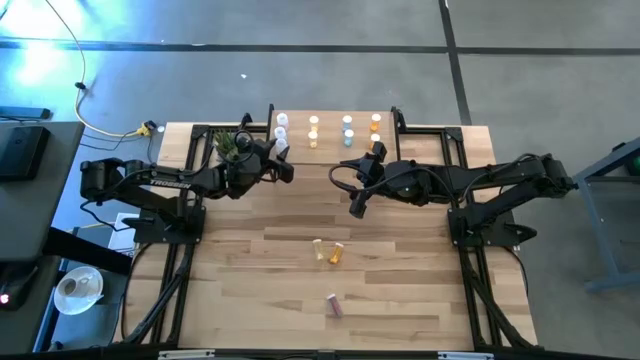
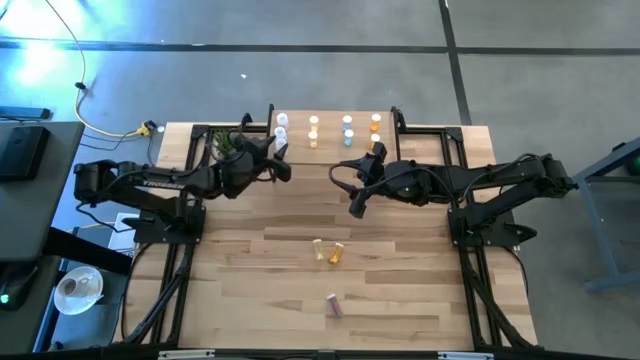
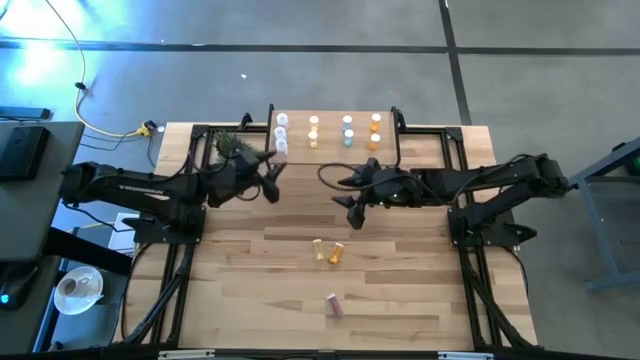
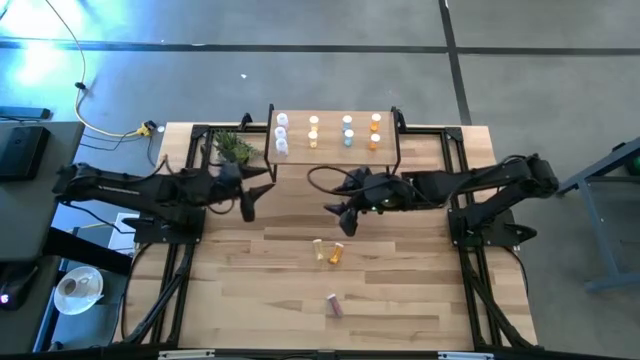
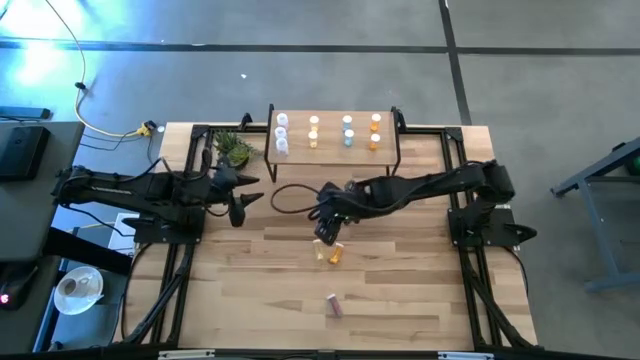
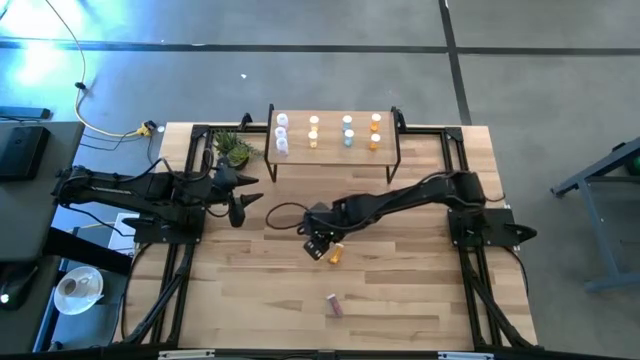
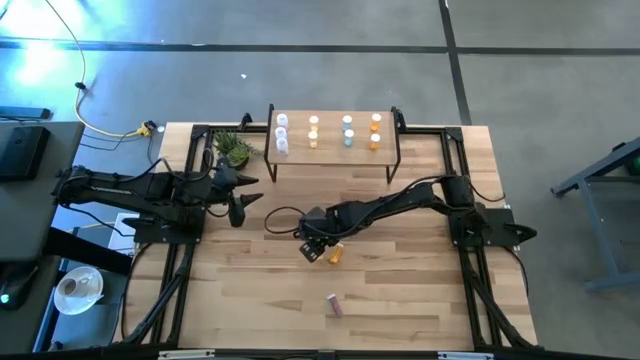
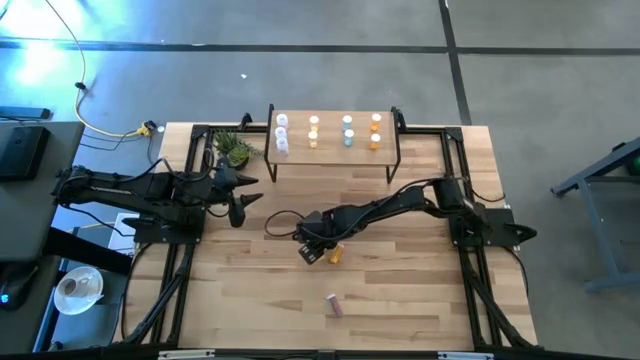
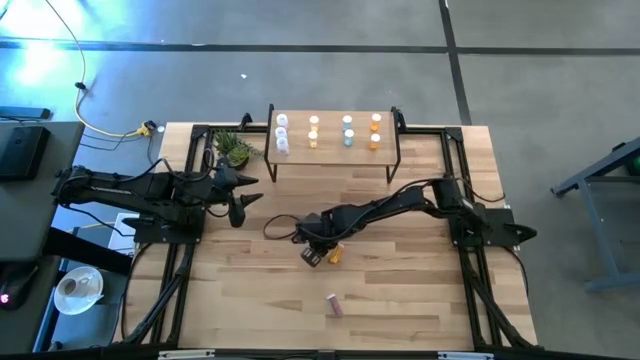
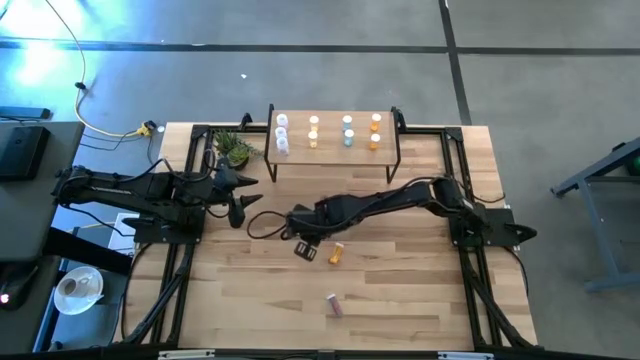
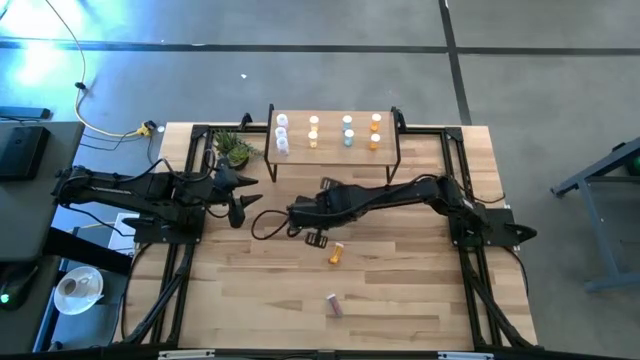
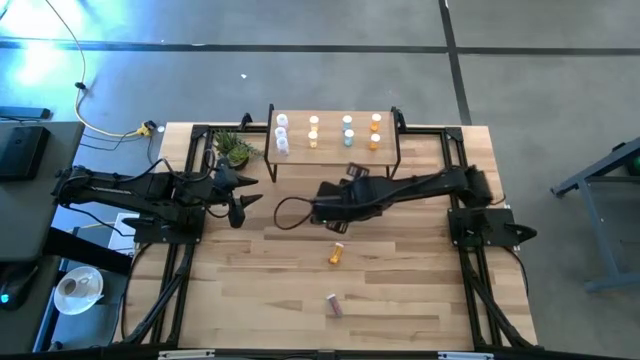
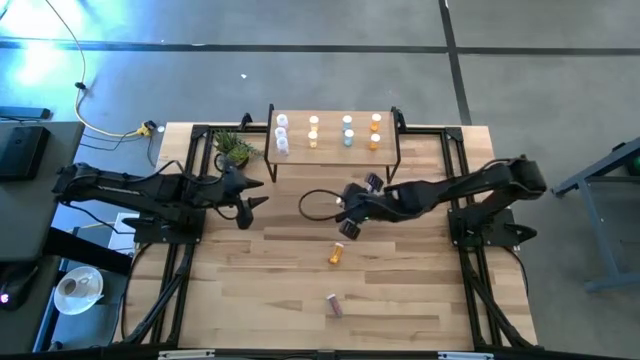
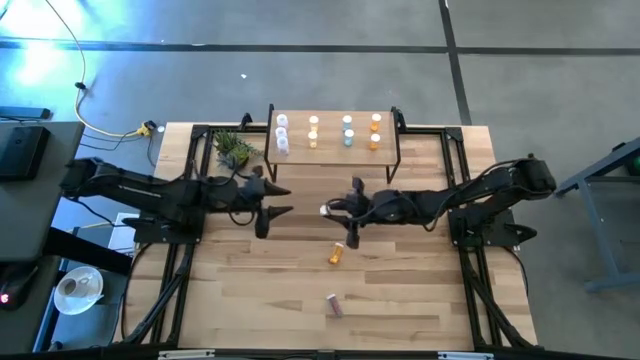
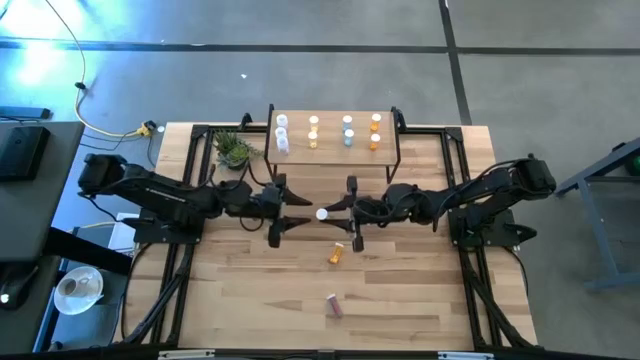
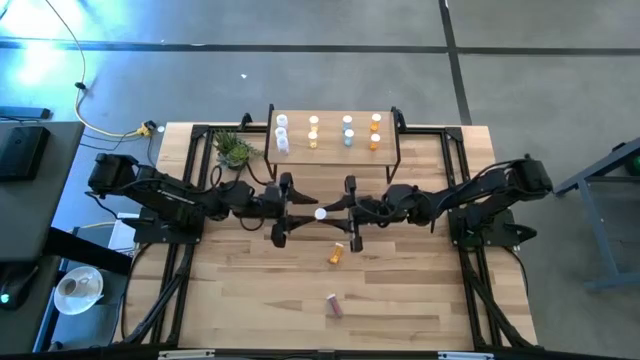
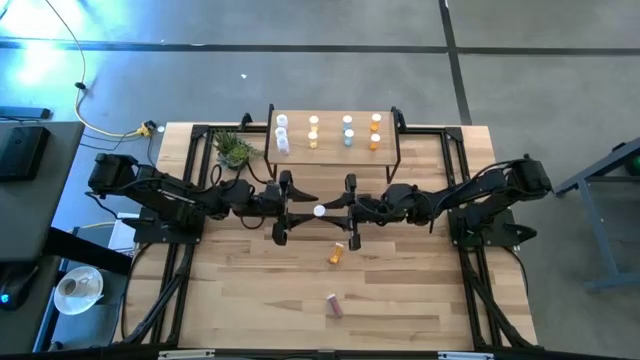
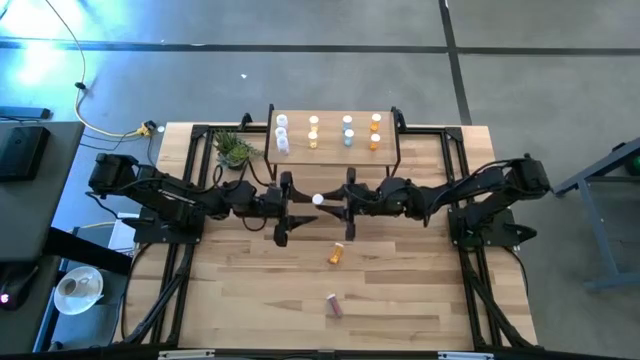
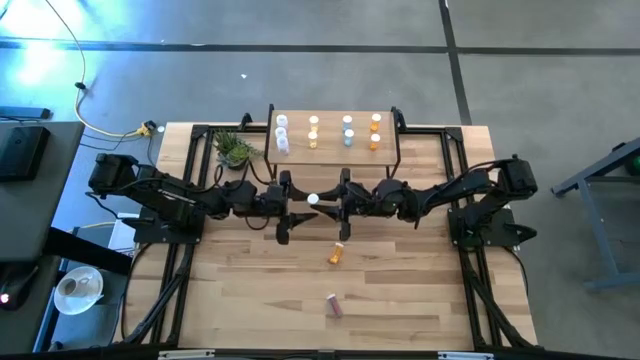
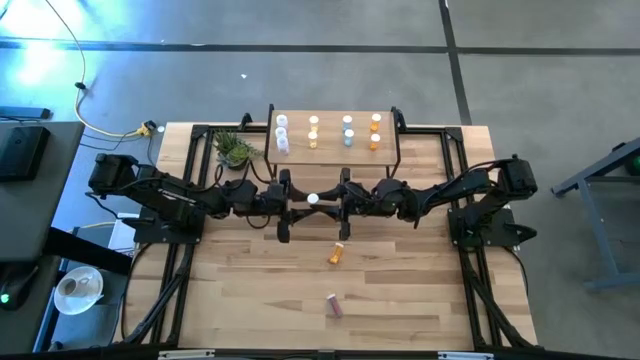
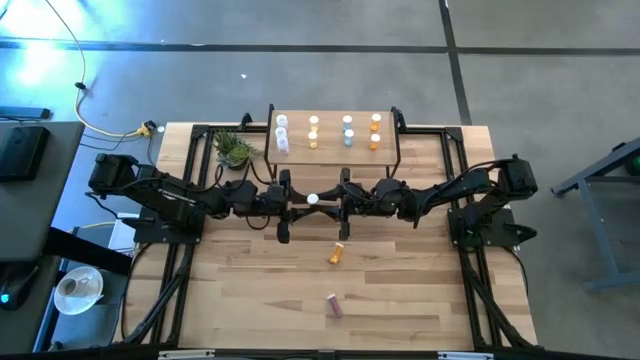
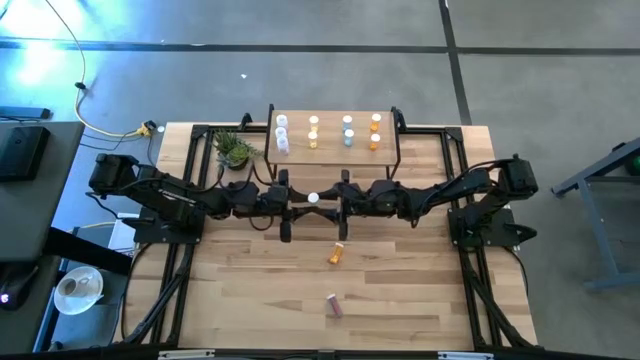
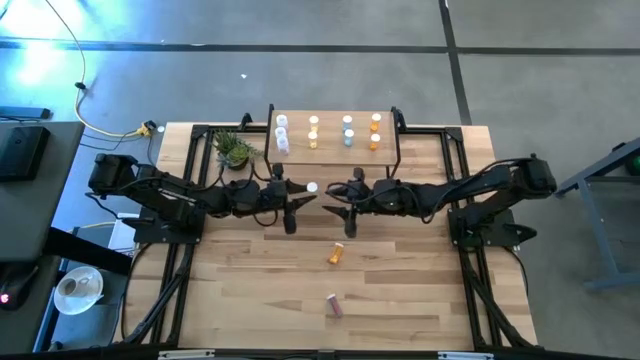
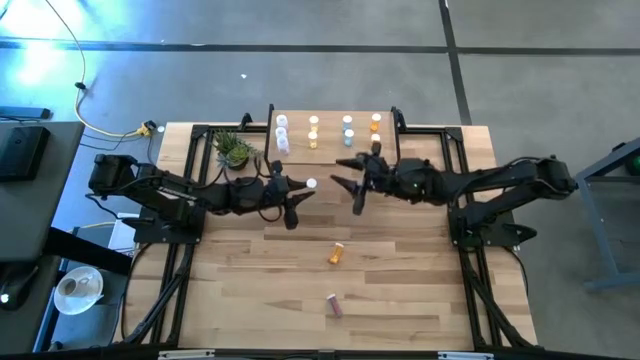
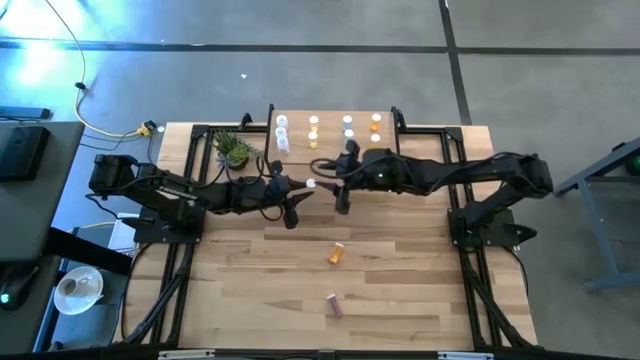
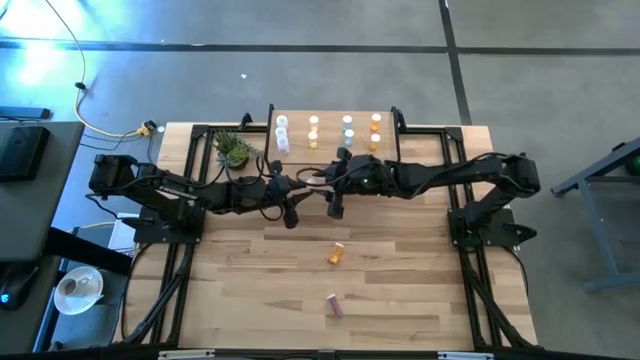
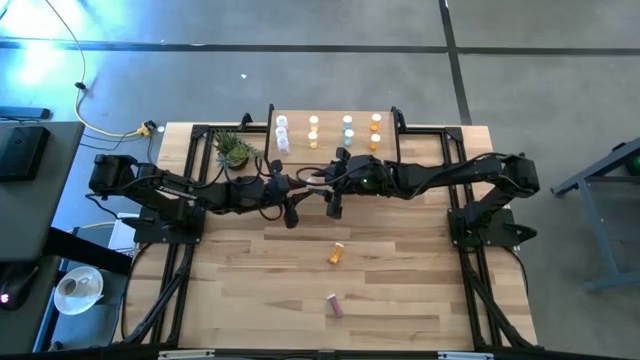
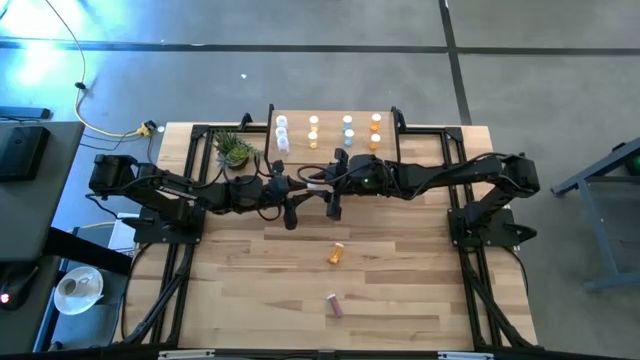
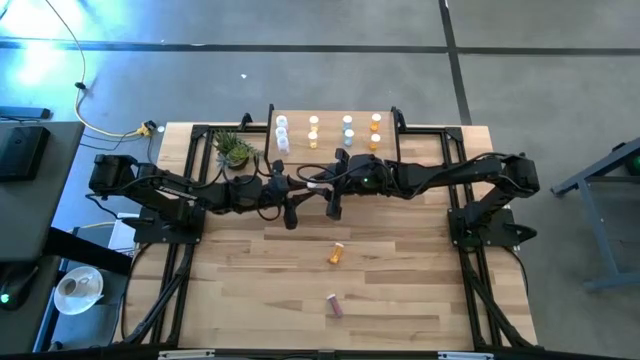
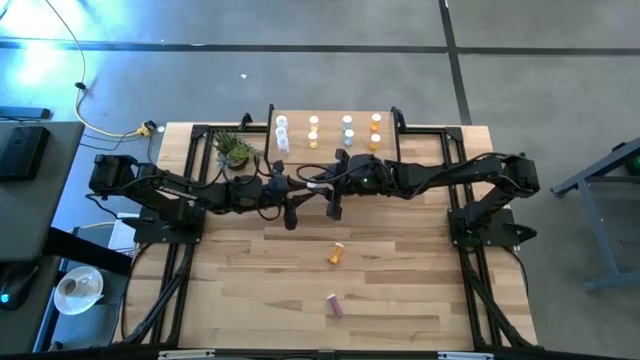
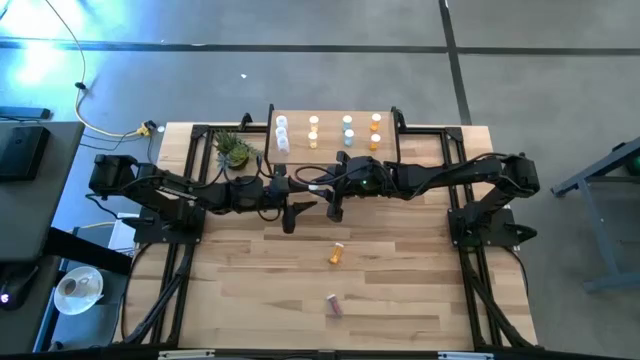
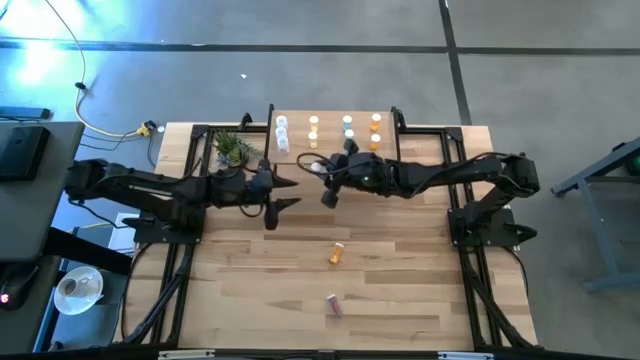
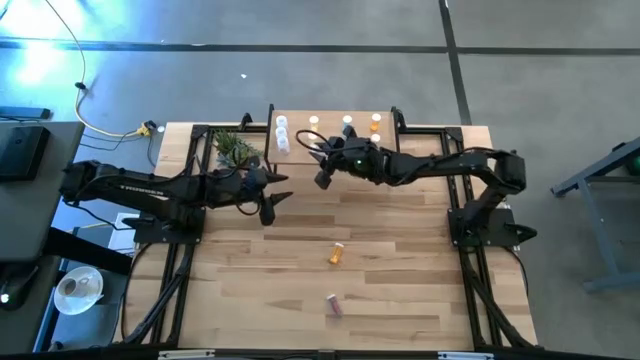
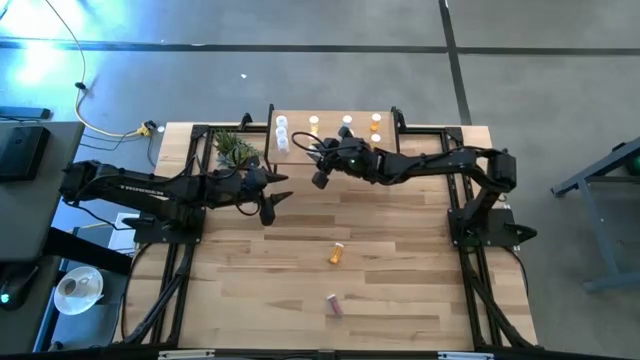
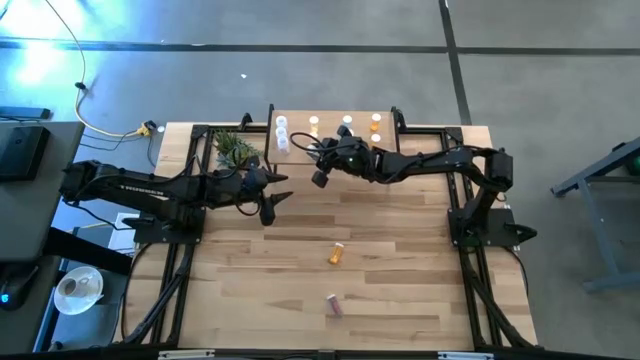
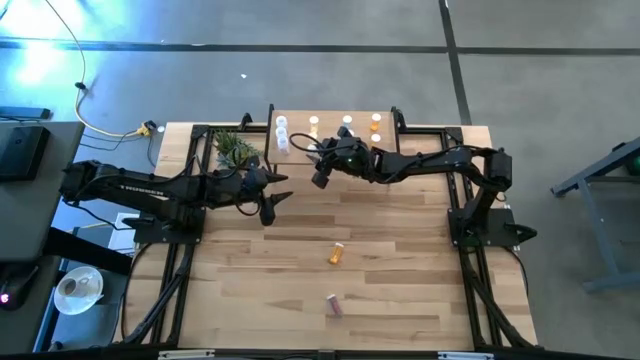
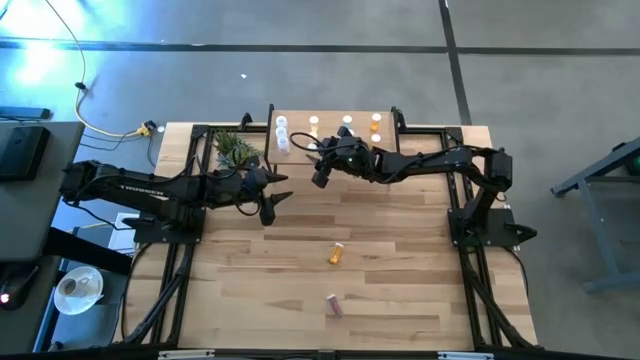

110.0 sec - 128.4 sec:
Task: Pick and place medicine bottles onto shelf by color
Put the yellow pill bottle aligned with the other yellow pill bottles on the shelf

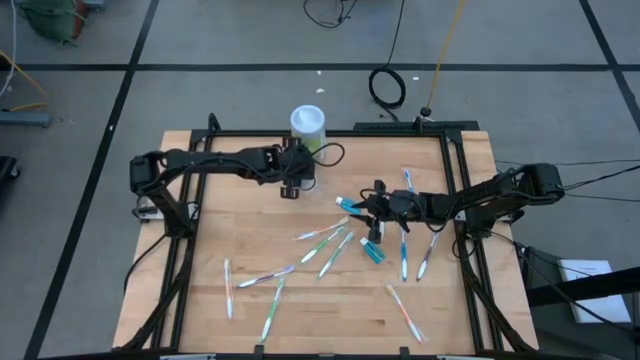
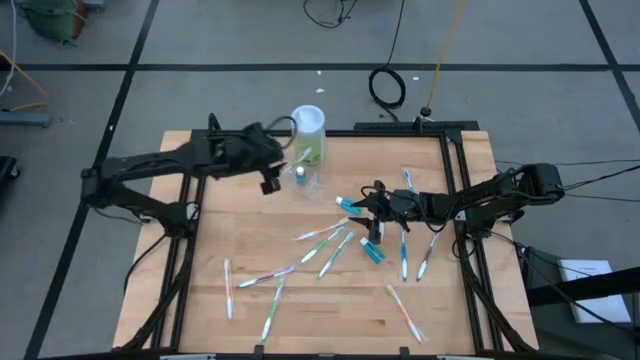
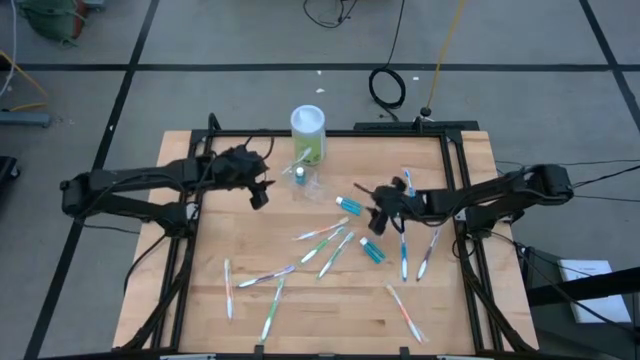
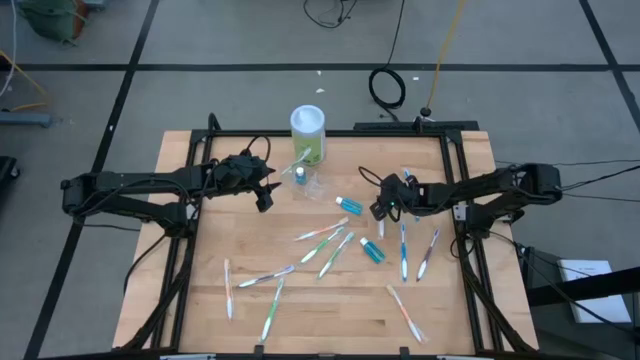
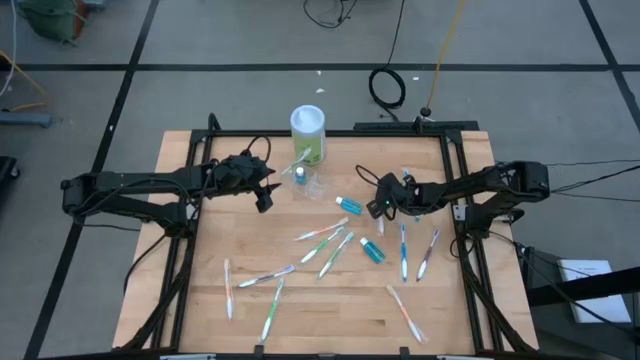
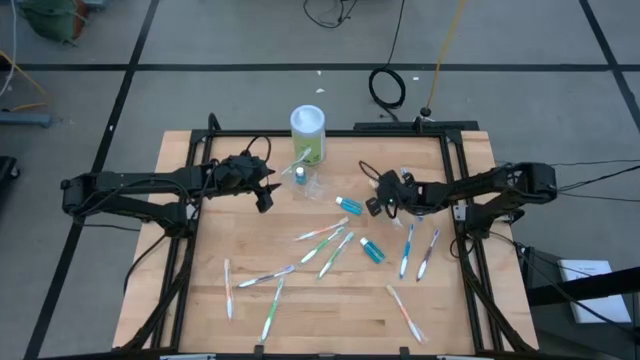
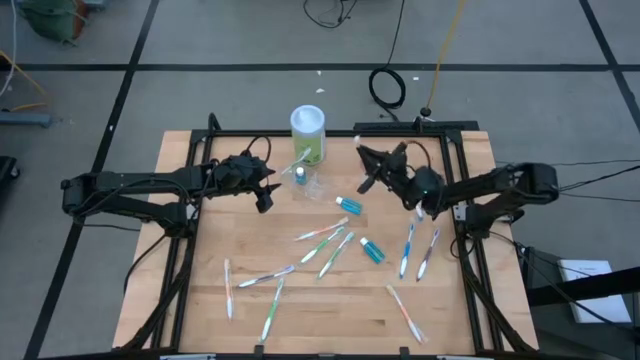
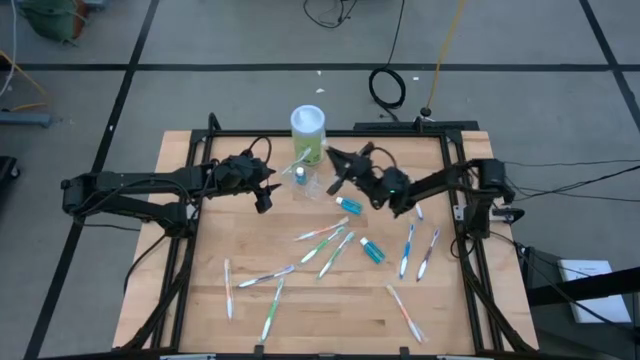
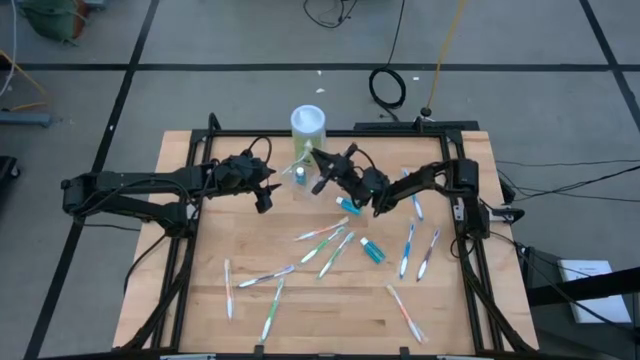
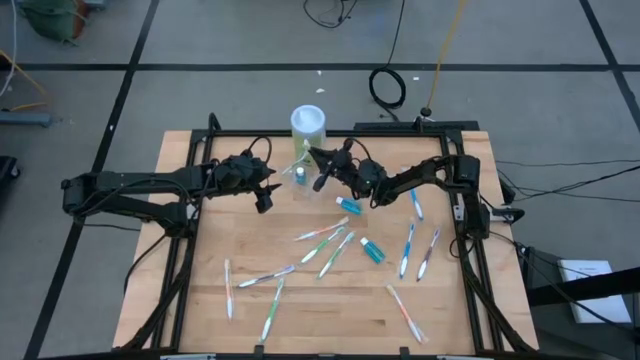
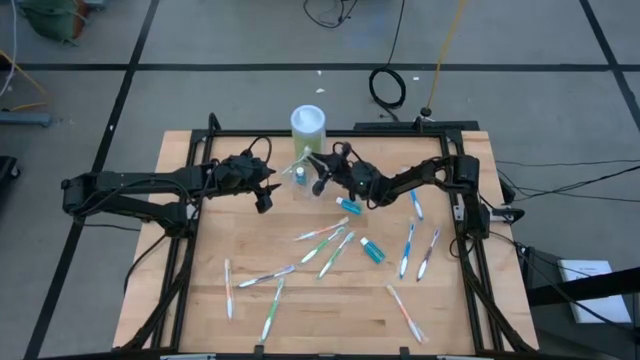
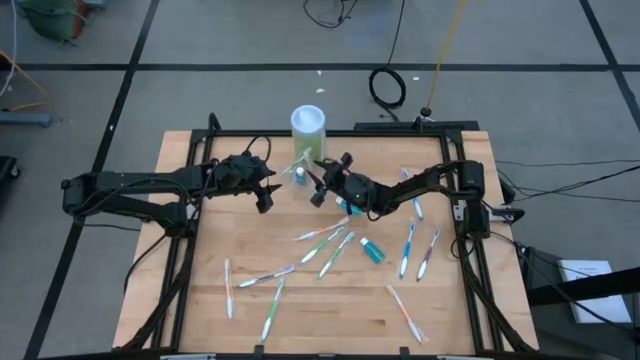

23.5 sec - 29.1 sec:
Task: Pick & Place toothbrushing station
Put the orange toothbrush into the right of the transparent organizer
